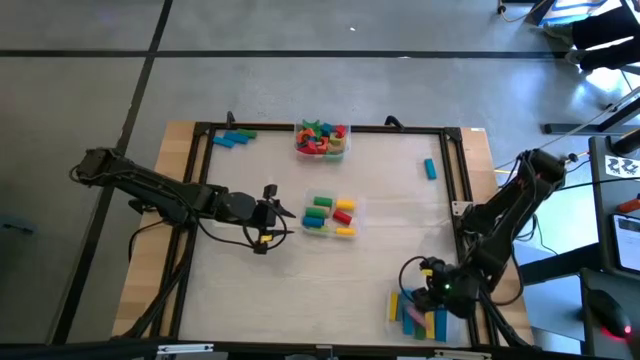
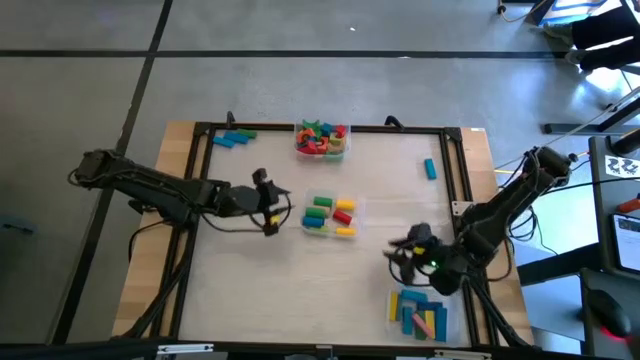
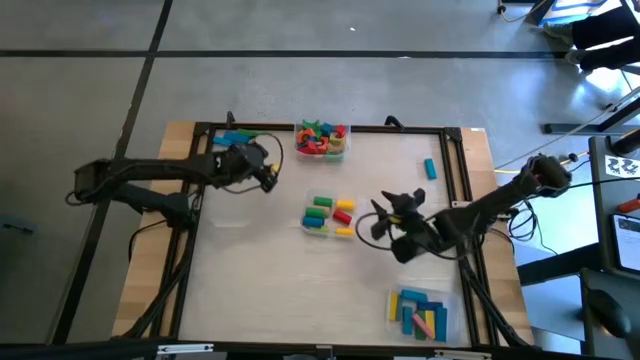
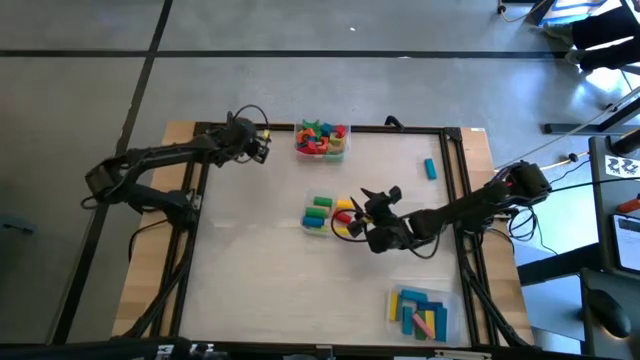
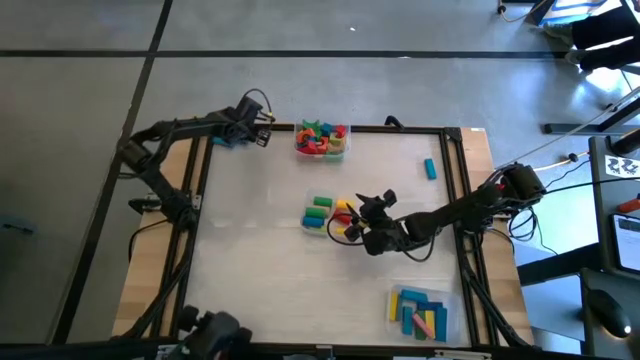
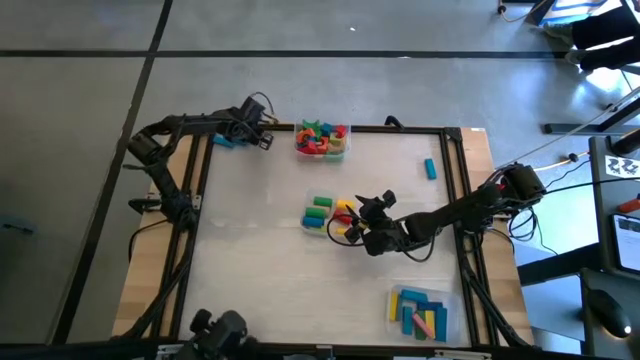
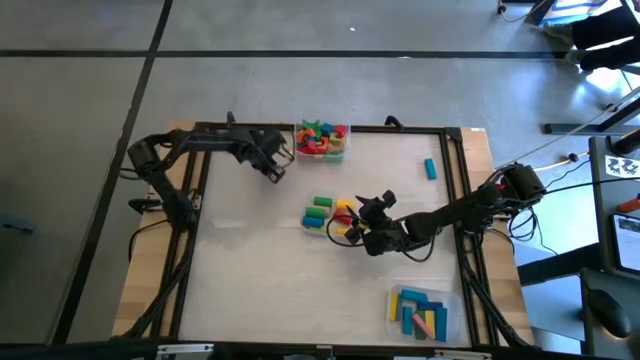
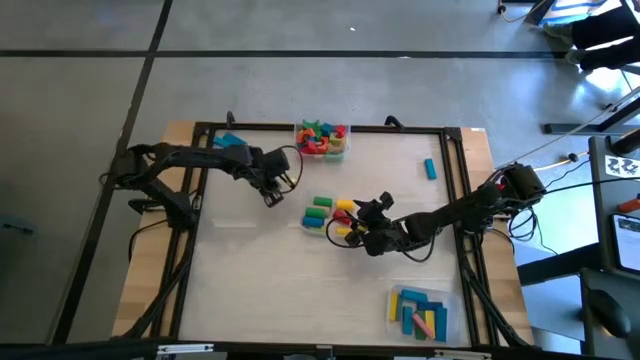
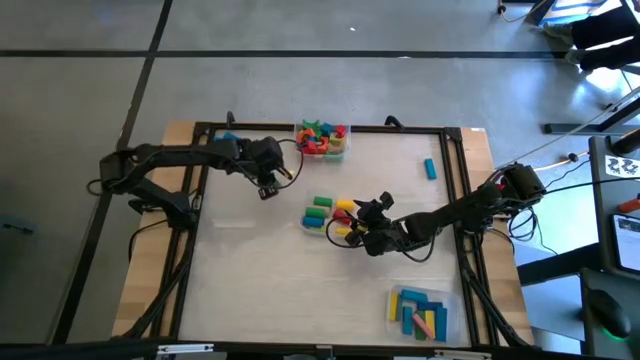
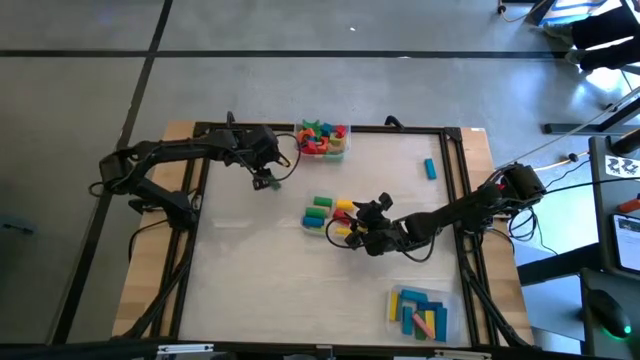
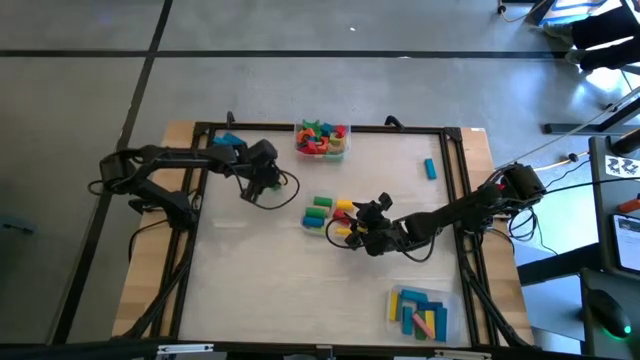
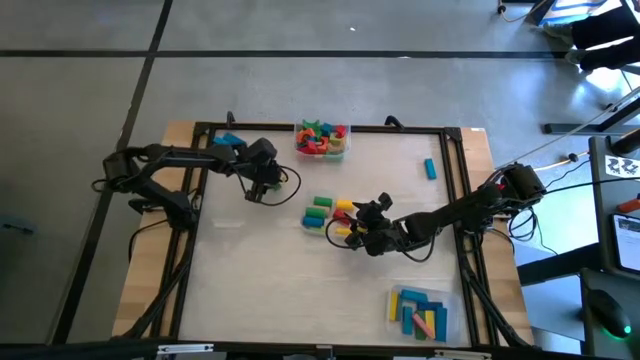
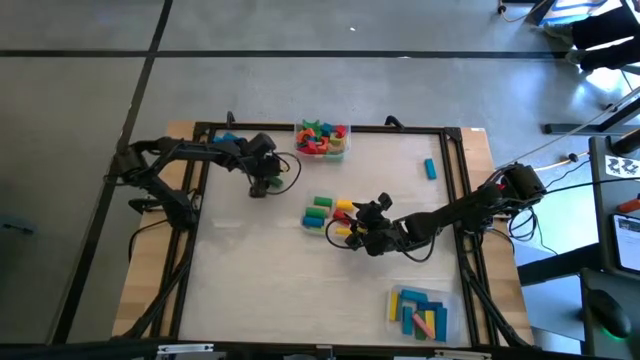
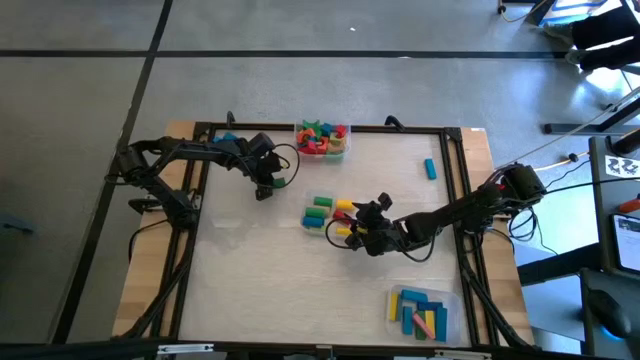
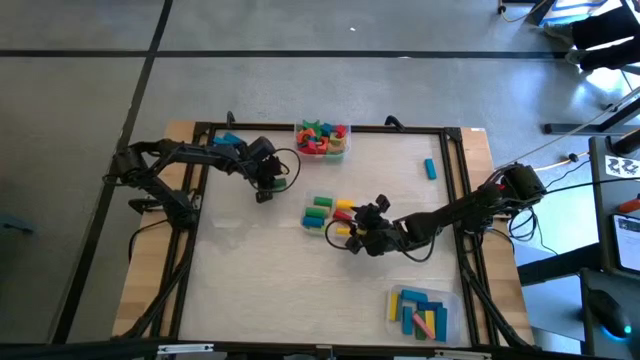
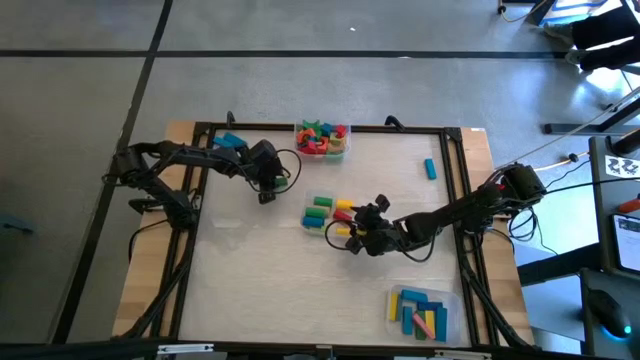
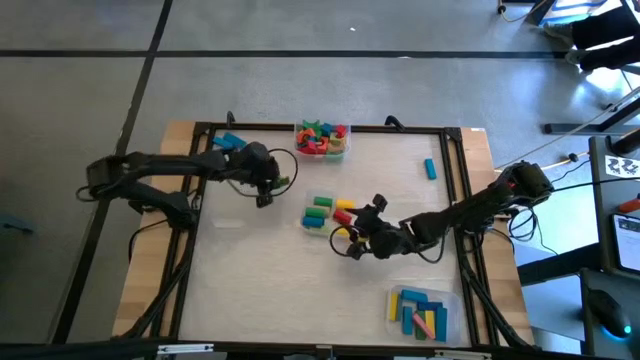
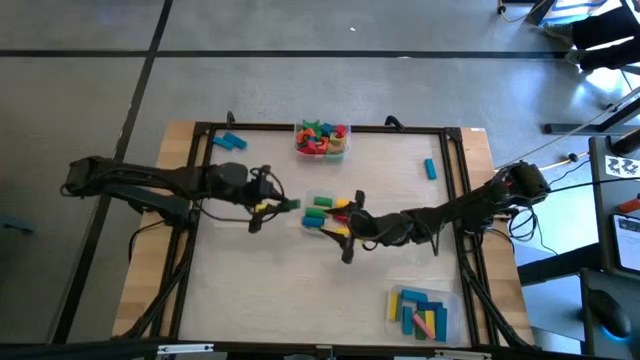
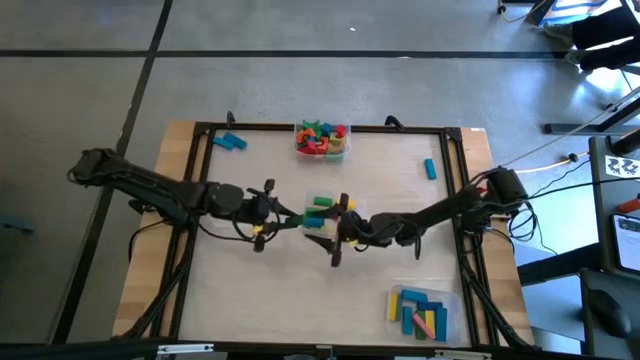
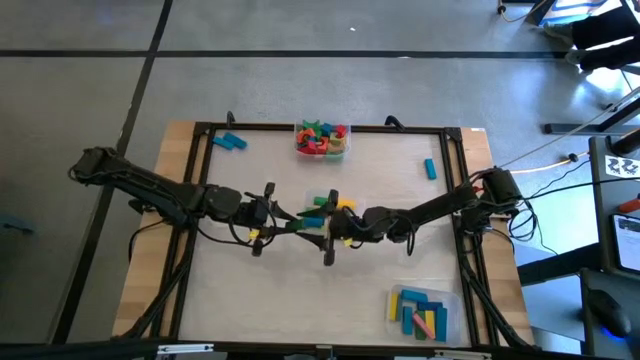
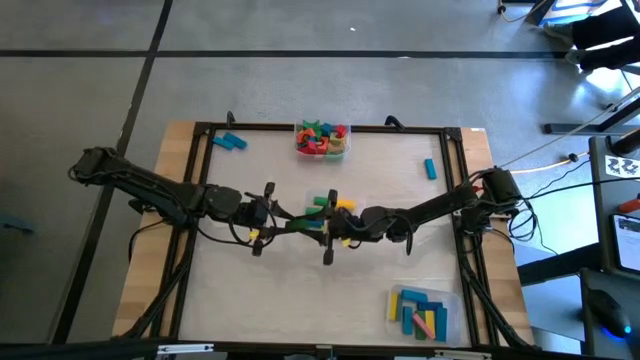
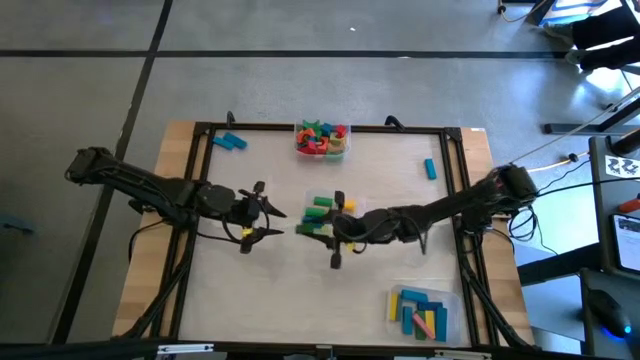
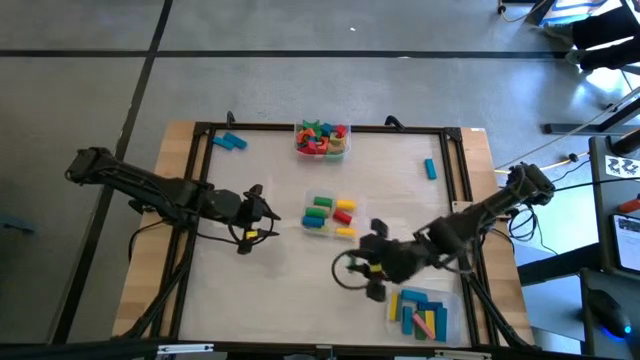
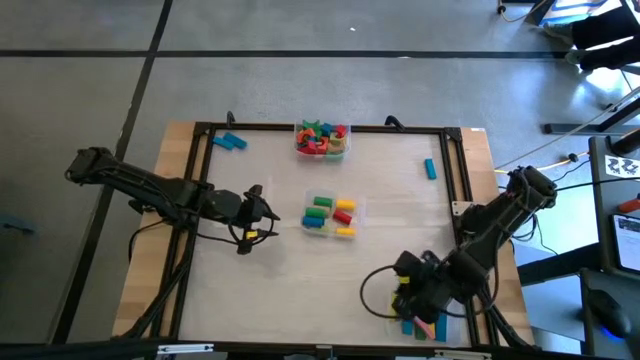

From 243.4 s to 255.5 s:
Task: Sort blocks by size
Put the green rectangle block into the bottom transparent bin

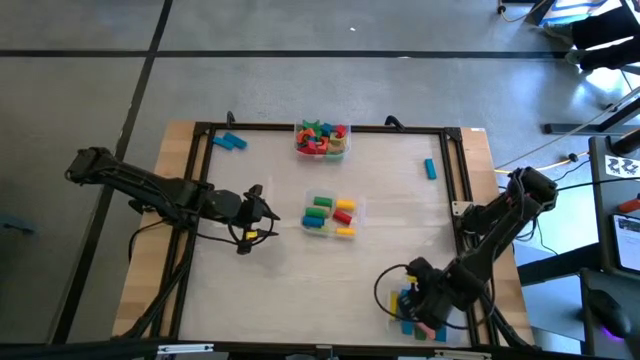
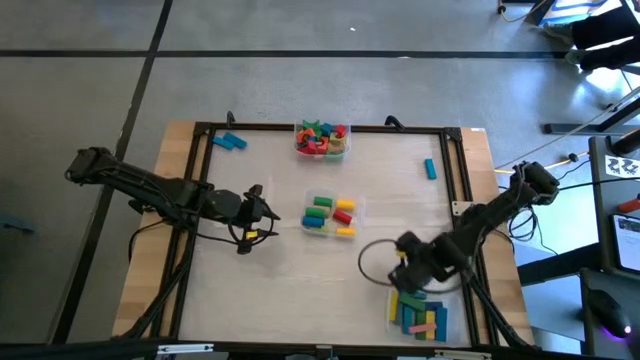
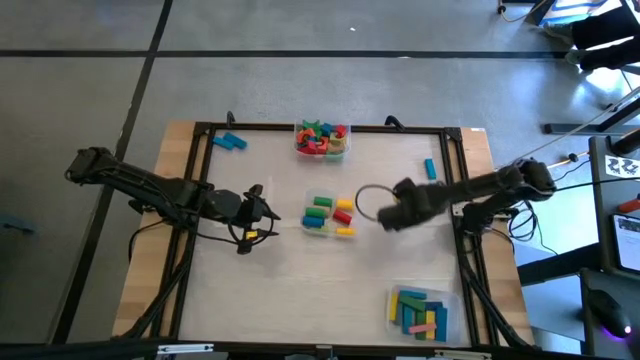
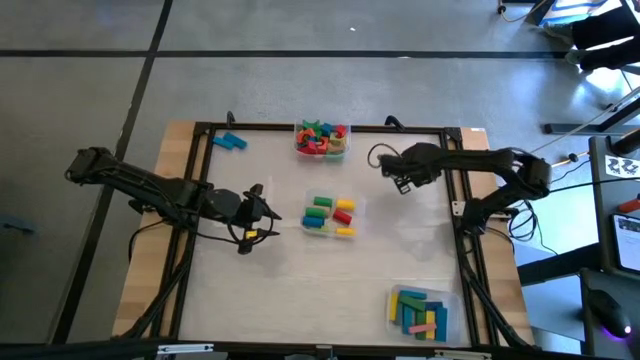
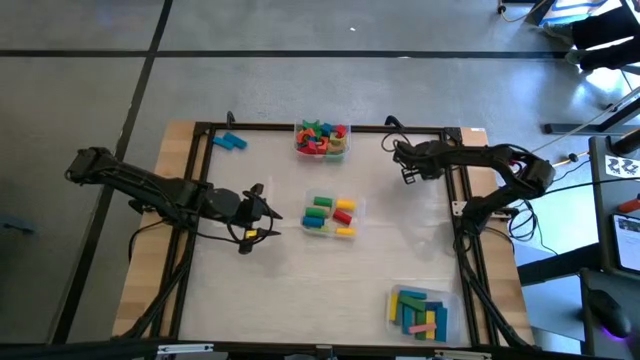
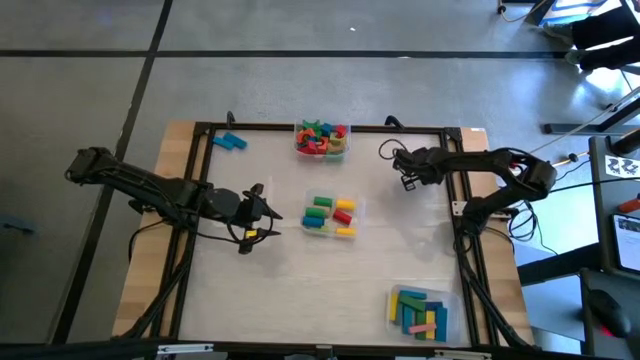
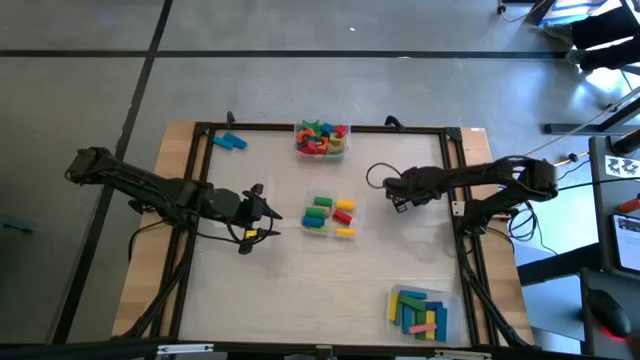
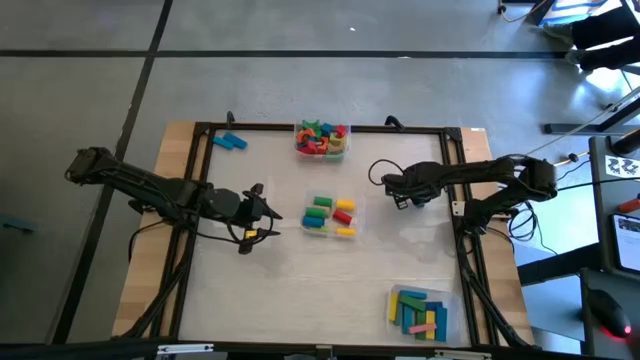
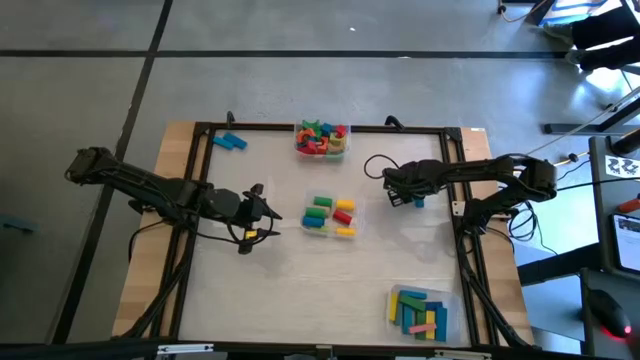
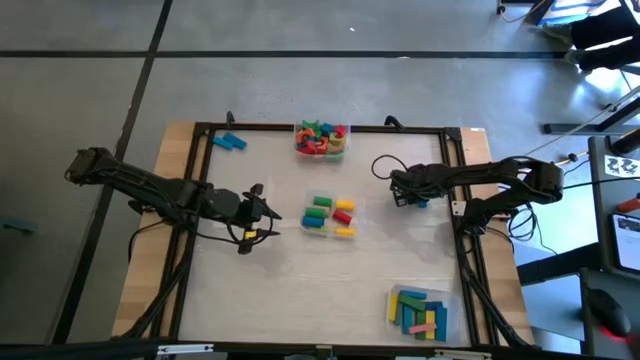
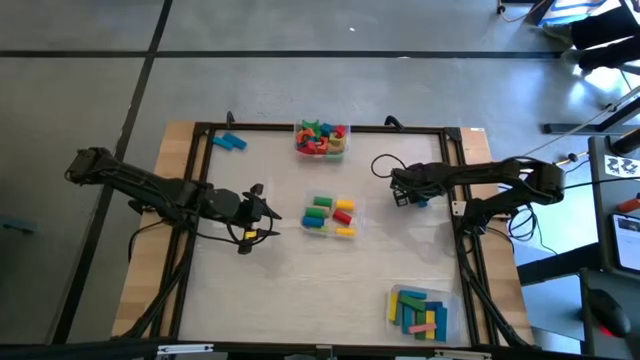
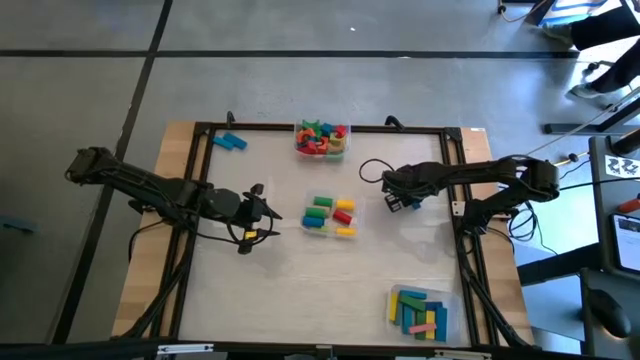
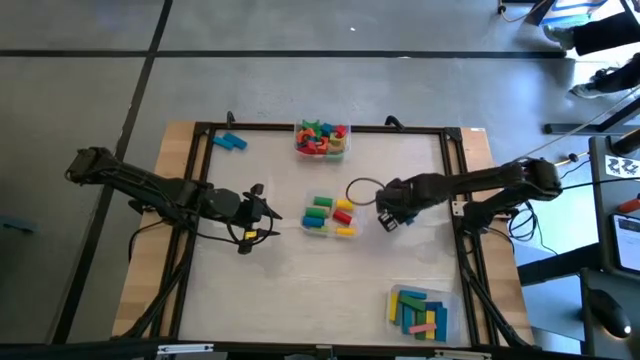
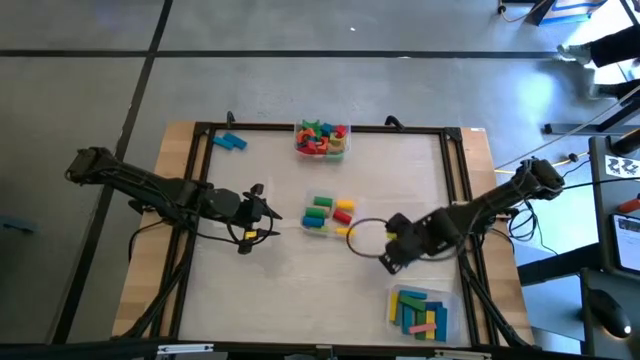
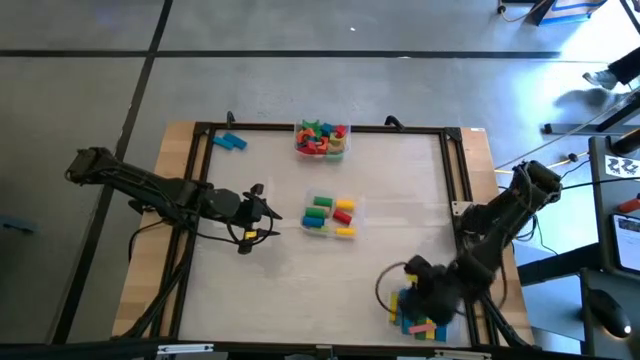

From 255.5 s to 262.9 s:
Put the blue rectangle block into the bottom transparent bin

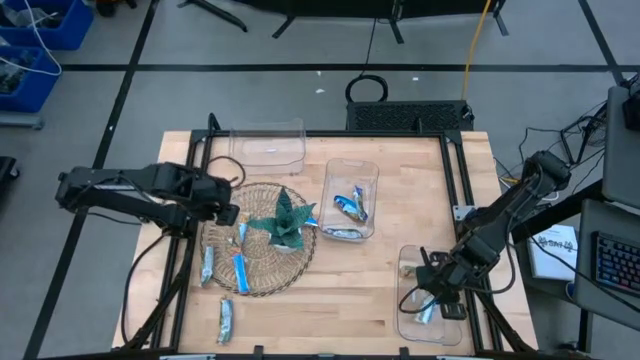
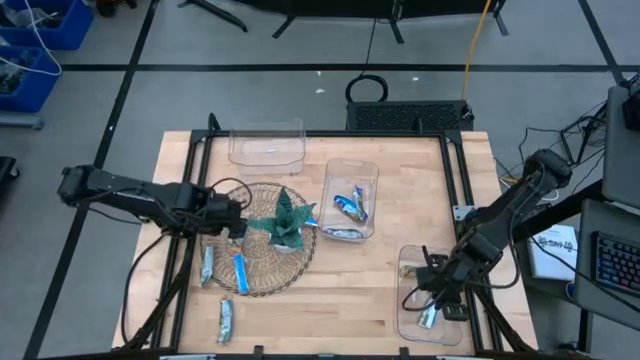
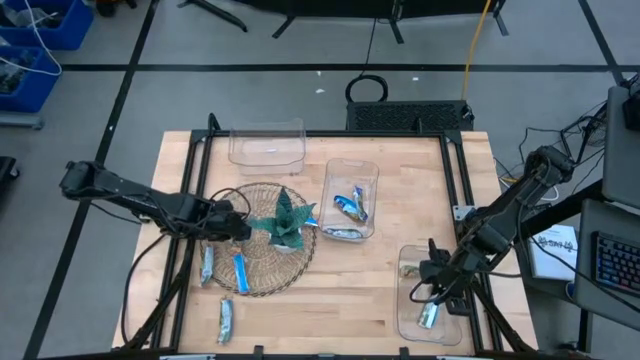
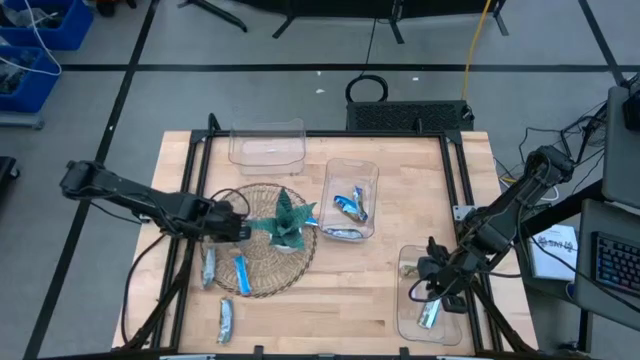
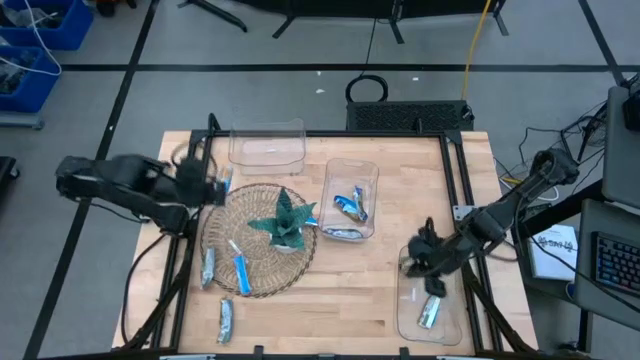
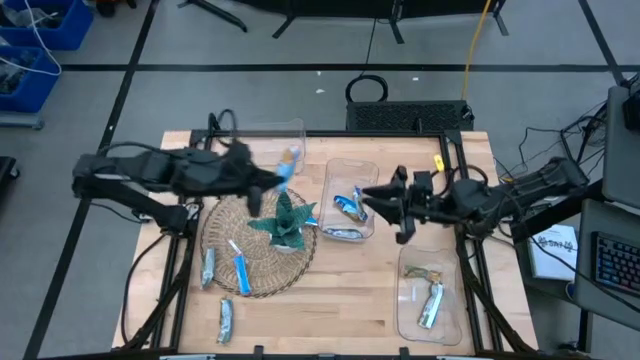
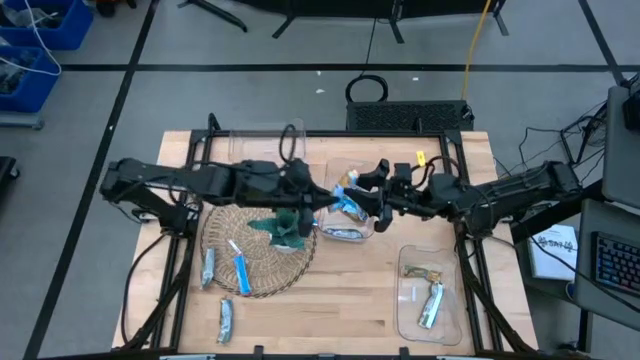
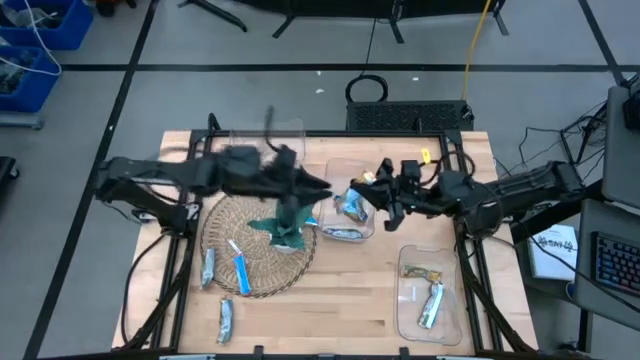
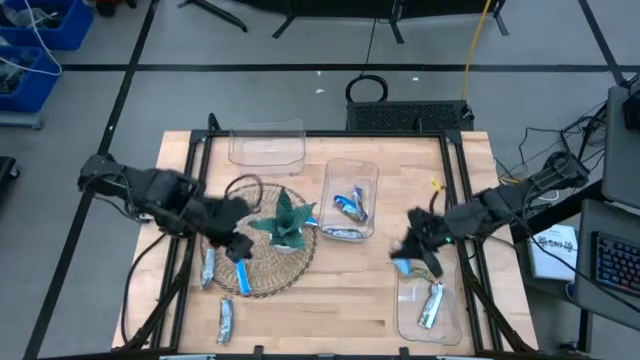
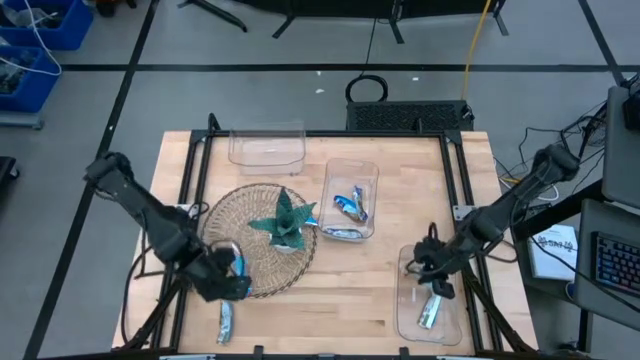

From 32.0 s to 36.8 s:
Task: Pick and place Granola Bars by type
Put the orange granola bar into the bottom transparent bin
